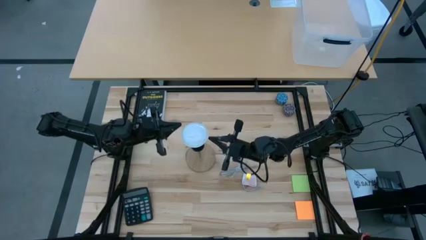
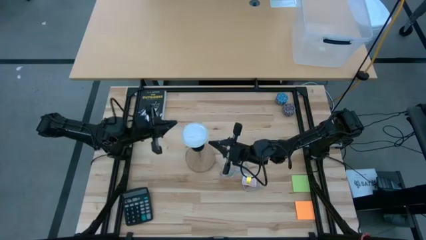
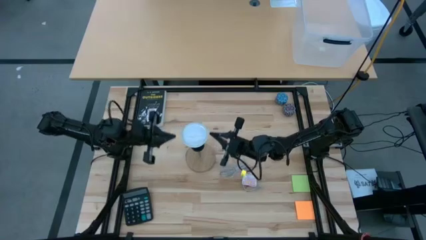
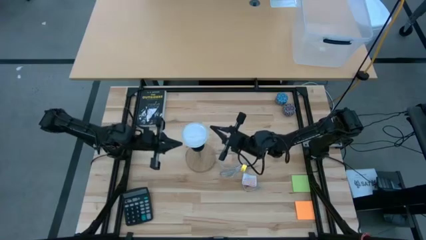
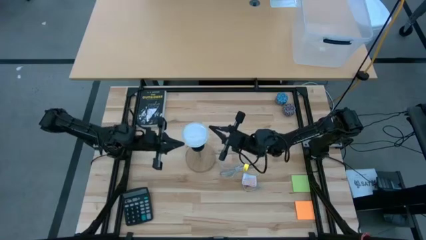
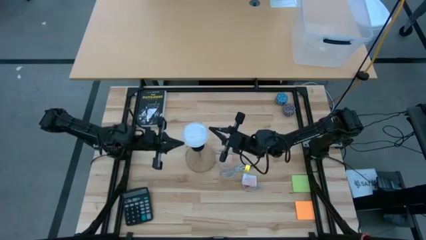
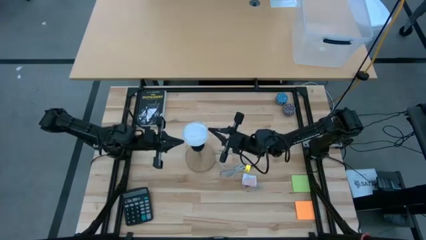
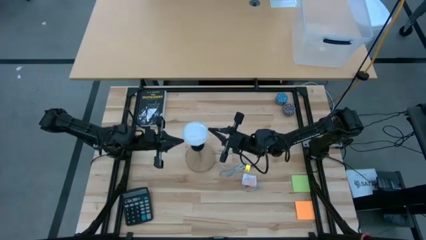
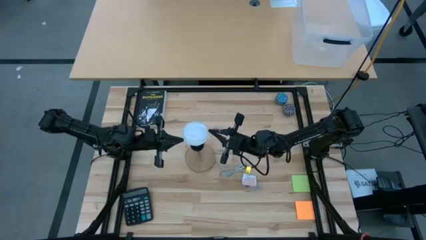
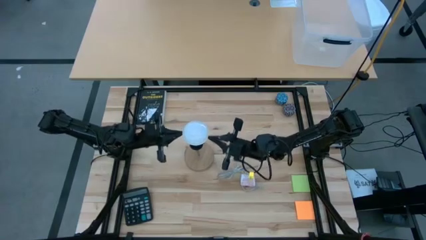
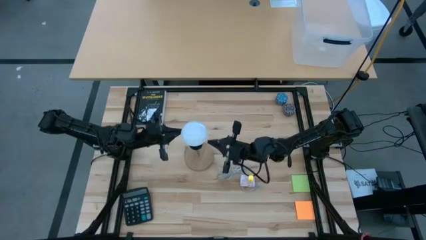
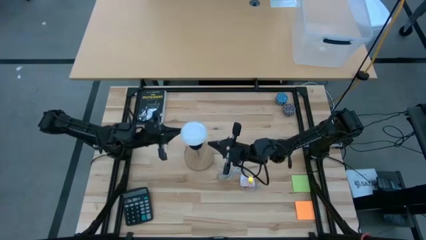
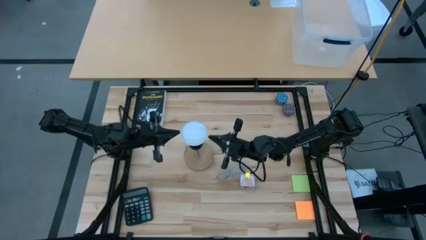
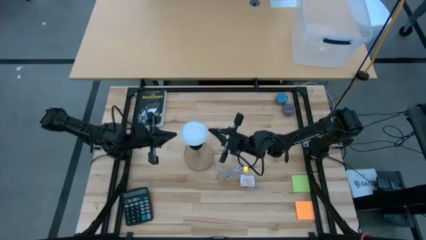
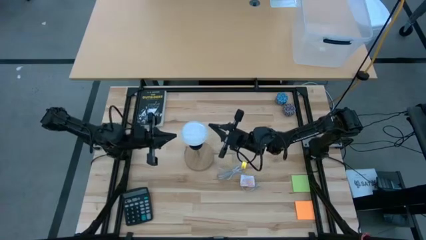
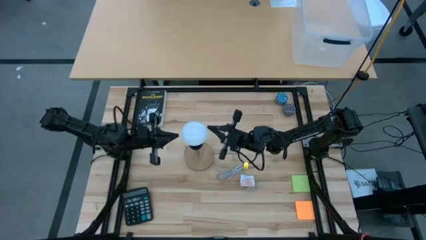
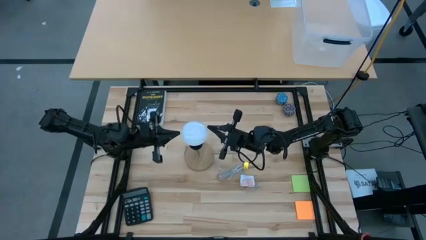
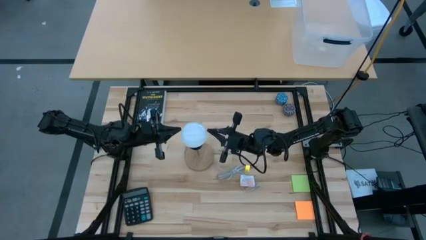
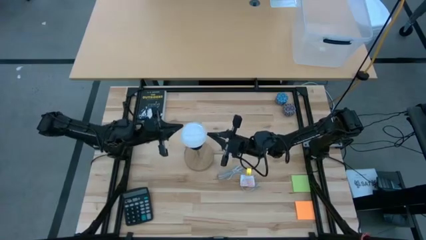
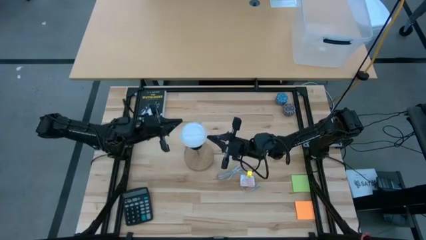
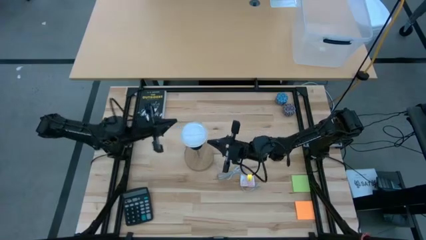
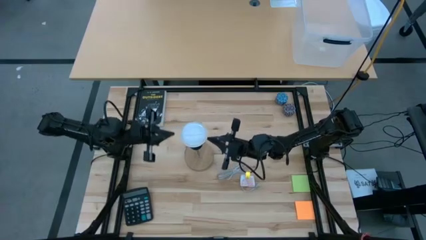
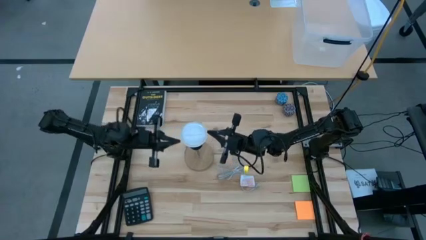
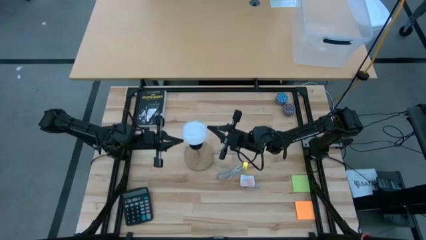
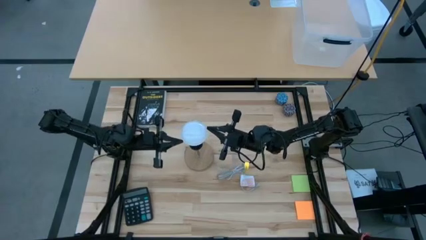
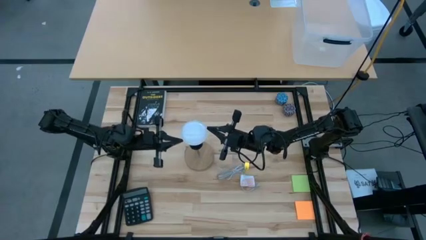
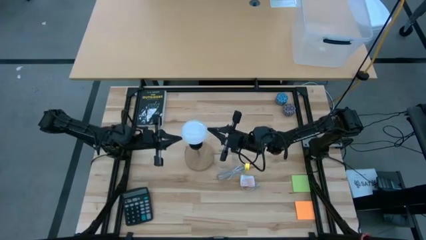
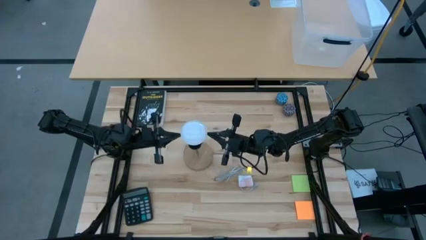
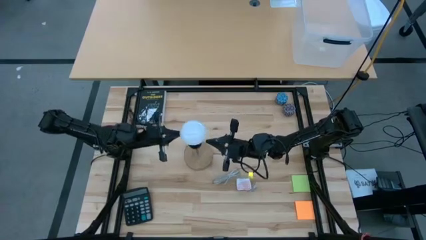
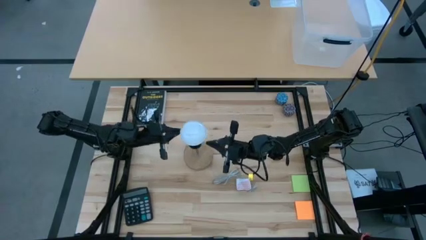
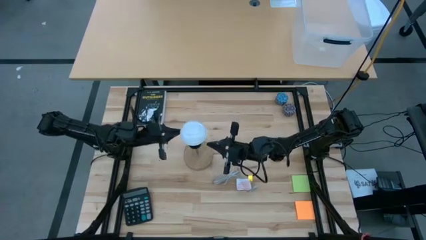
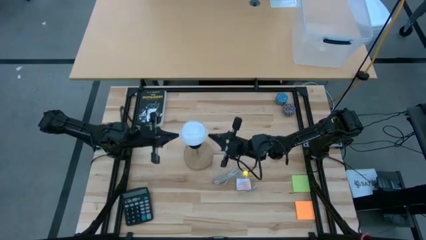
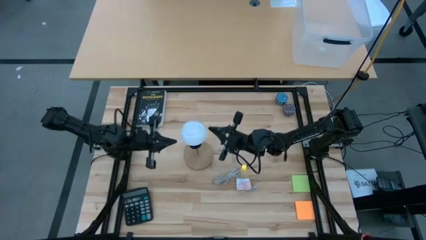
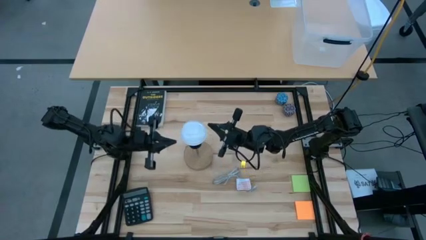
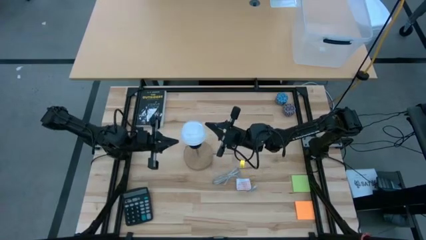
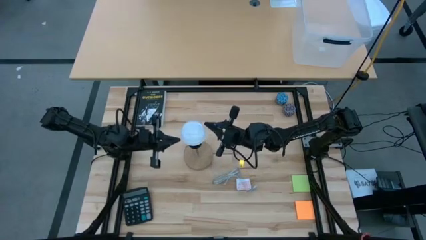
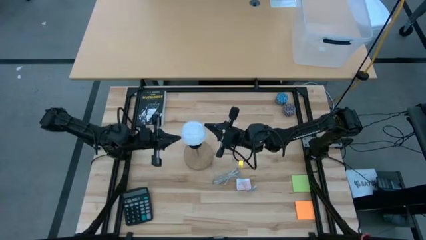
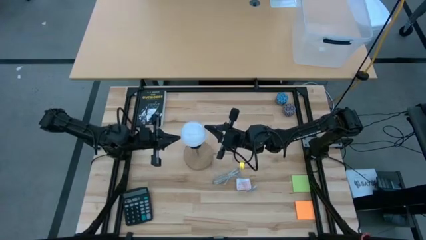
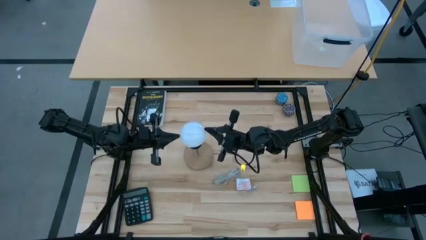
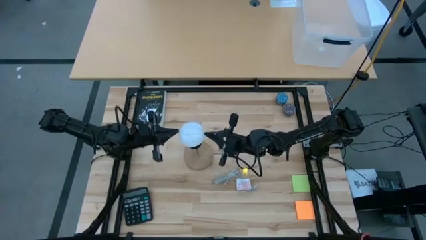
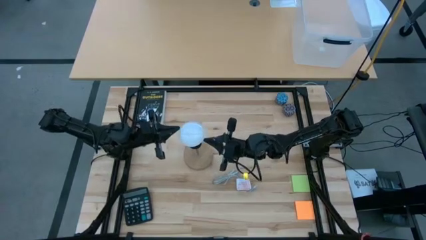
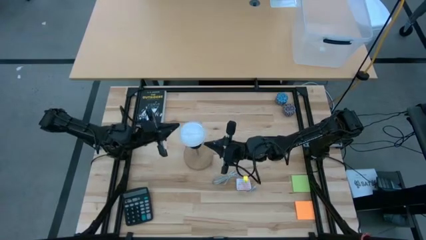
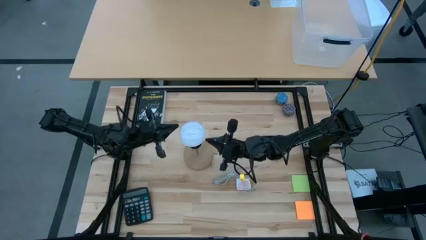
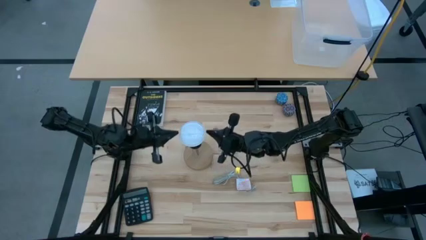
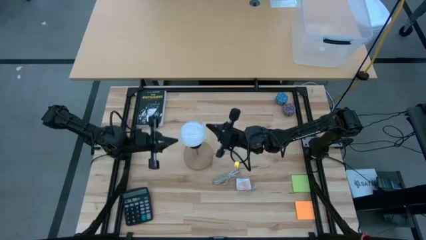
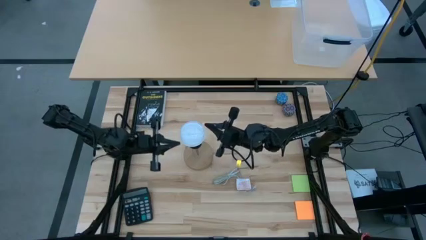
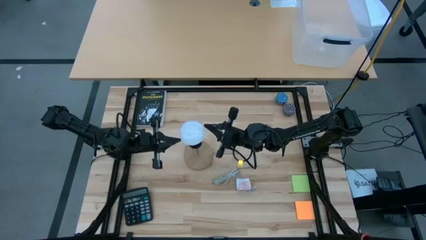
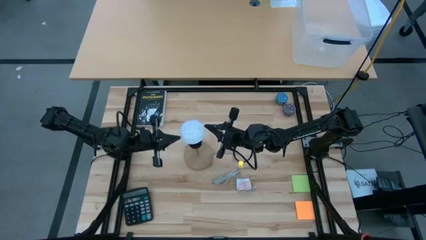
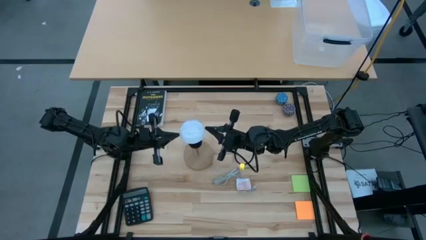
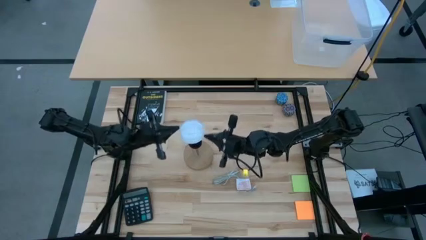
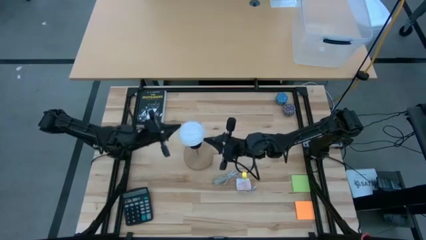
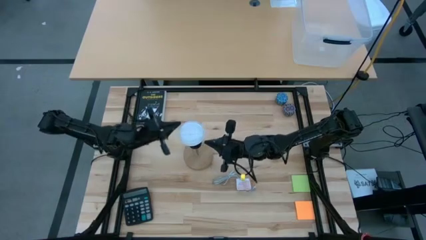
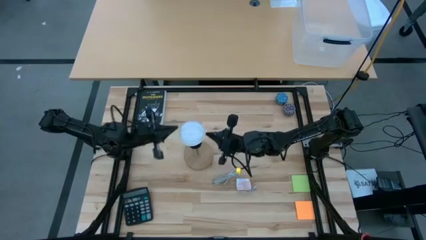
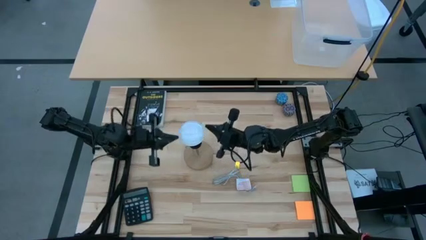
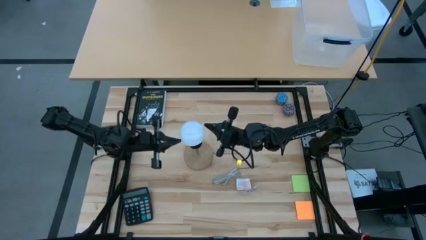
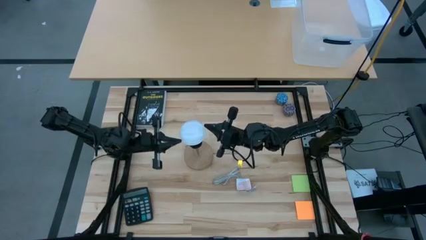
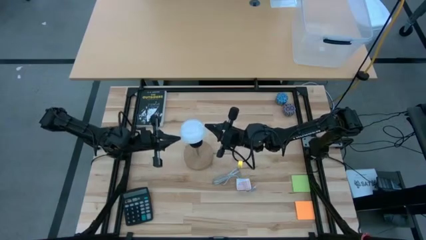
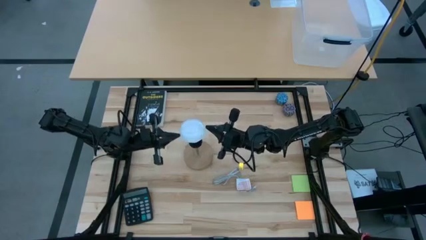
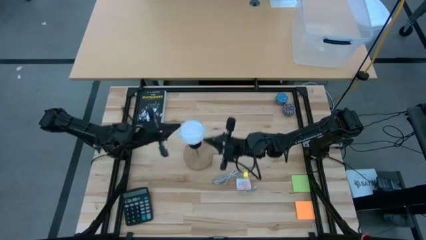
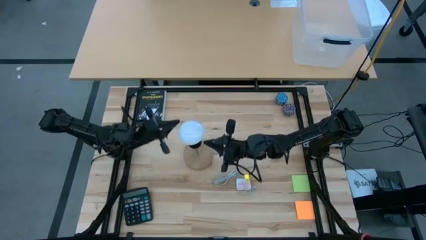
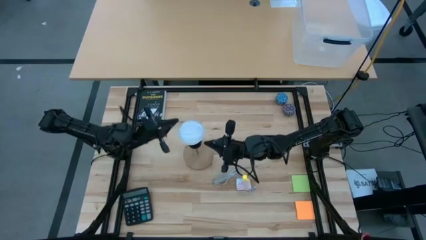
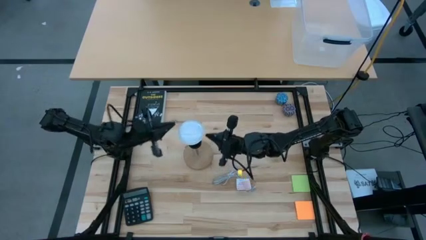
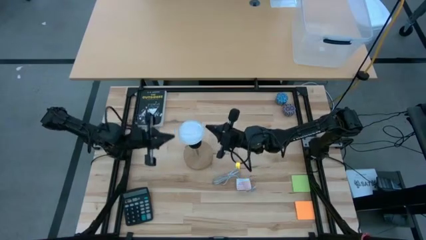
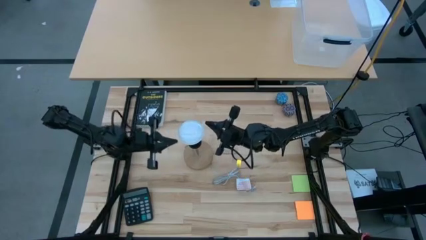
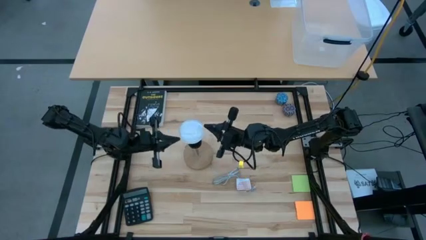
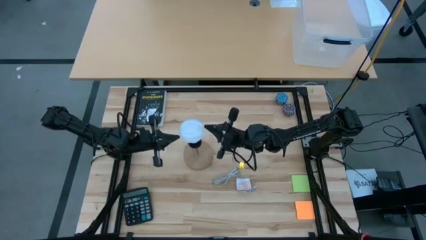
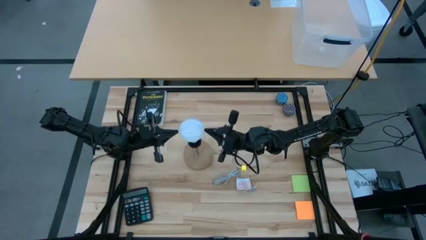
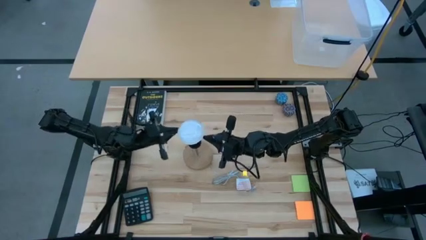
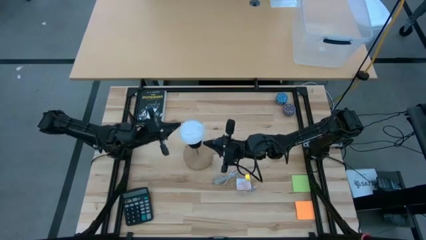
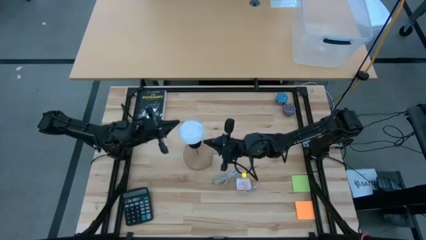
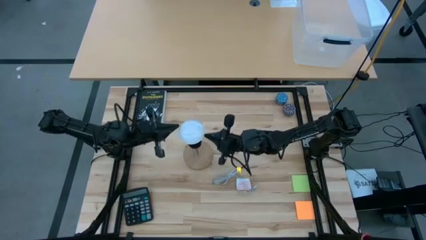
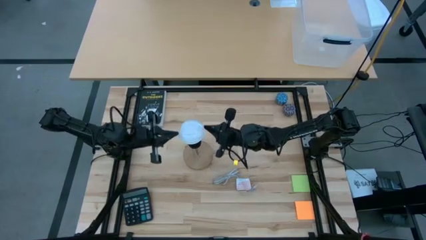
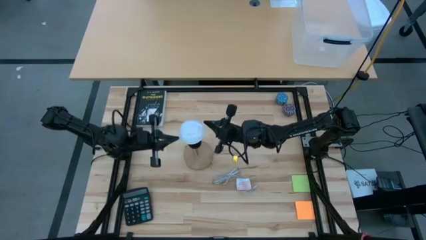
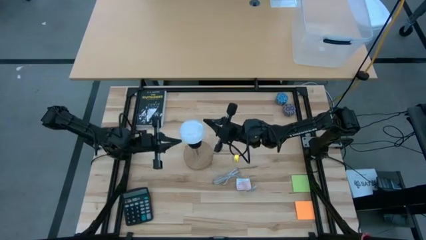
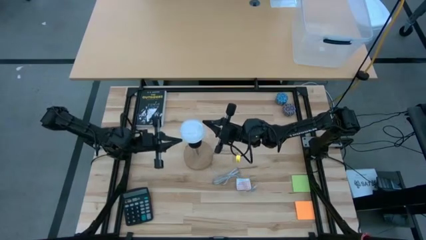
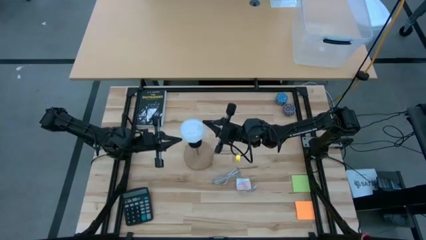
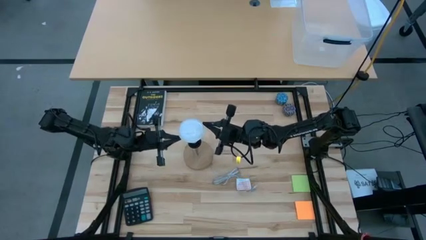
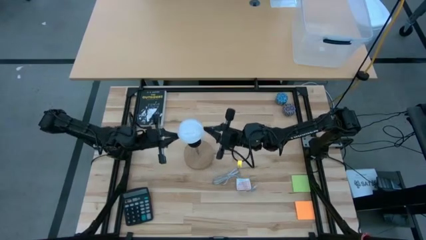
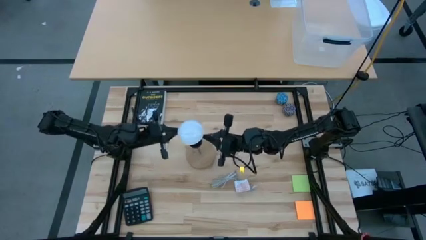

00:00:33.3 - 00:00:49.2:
Task: Screw lightbulb
Insert the lightbulb into the lamp socket
